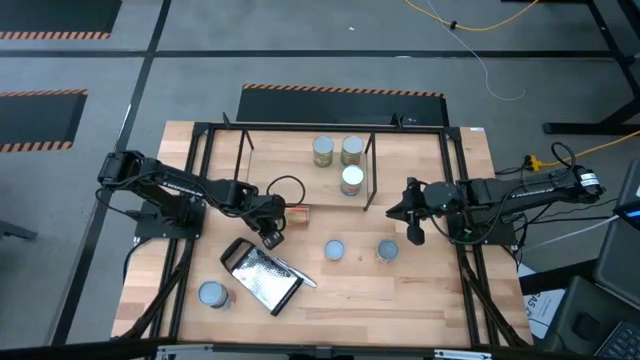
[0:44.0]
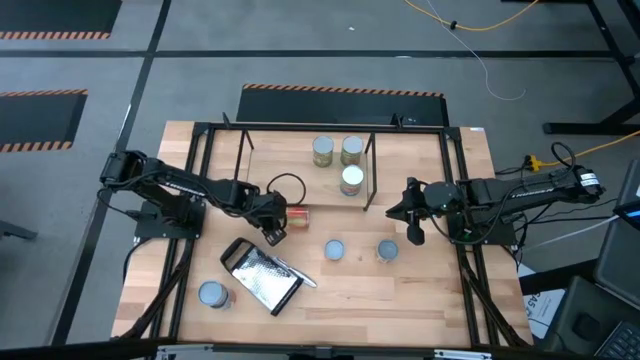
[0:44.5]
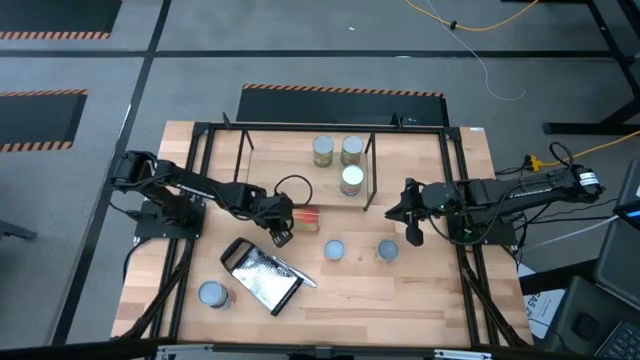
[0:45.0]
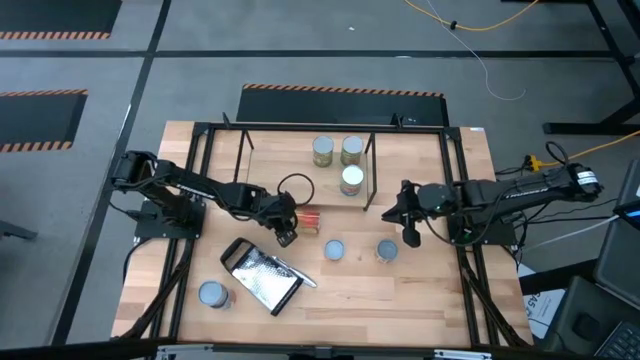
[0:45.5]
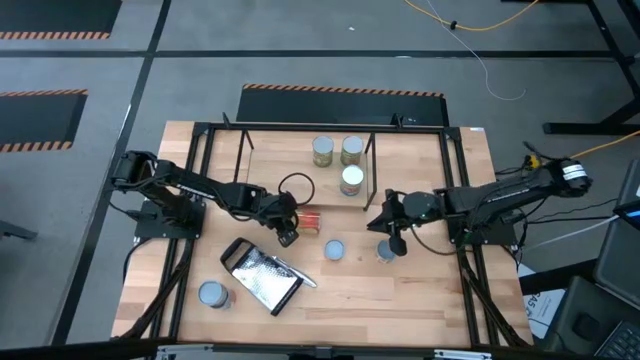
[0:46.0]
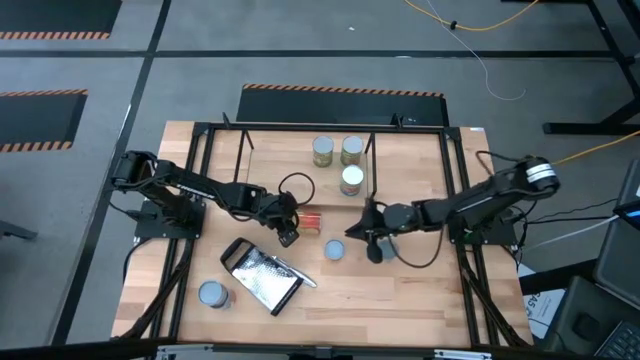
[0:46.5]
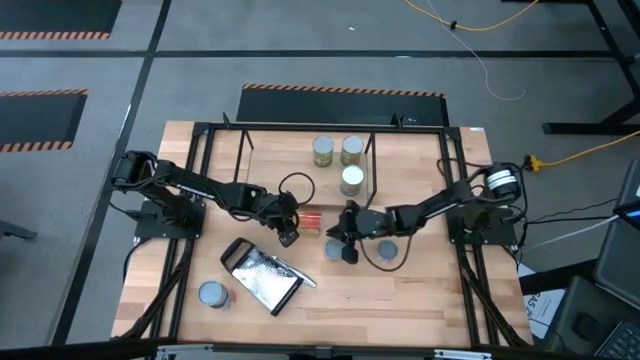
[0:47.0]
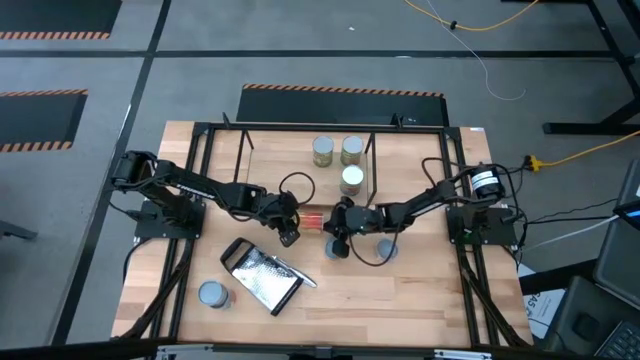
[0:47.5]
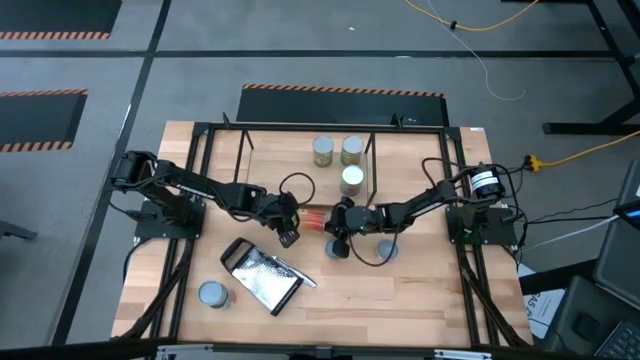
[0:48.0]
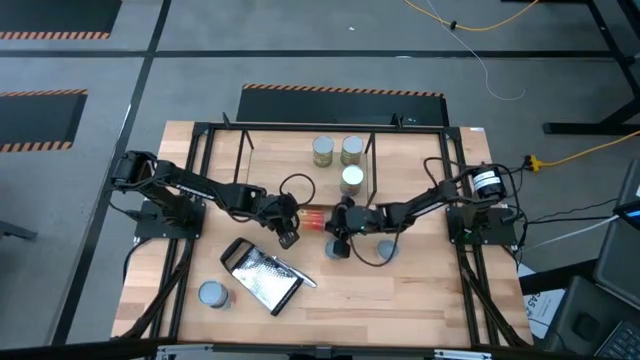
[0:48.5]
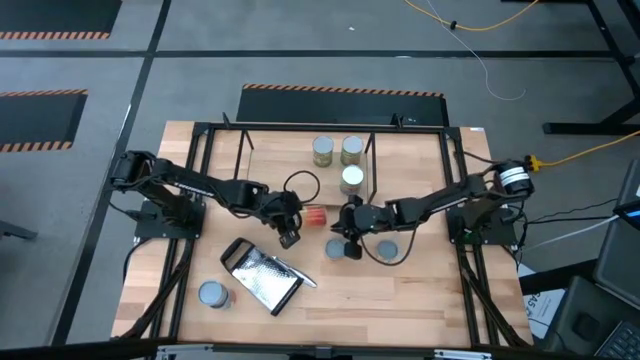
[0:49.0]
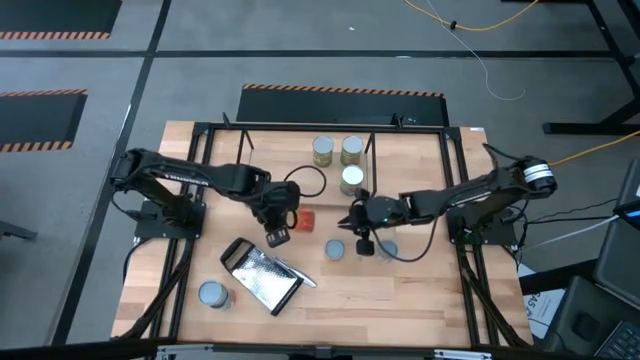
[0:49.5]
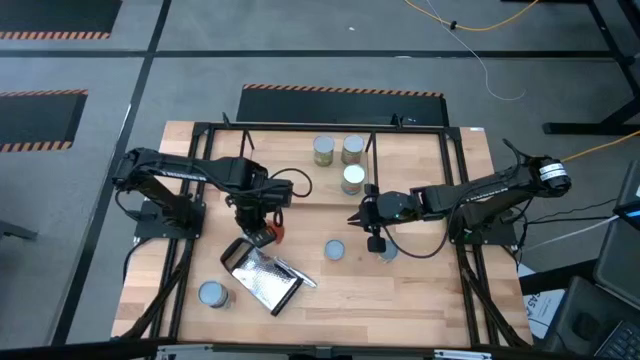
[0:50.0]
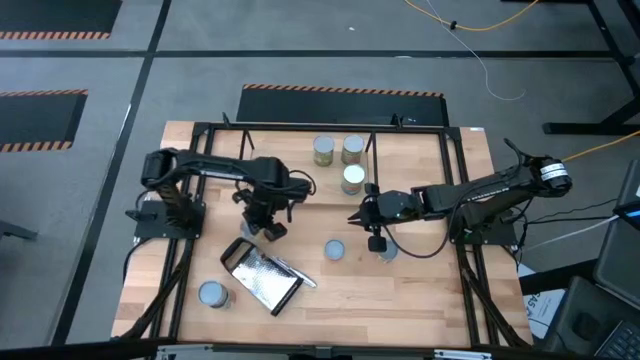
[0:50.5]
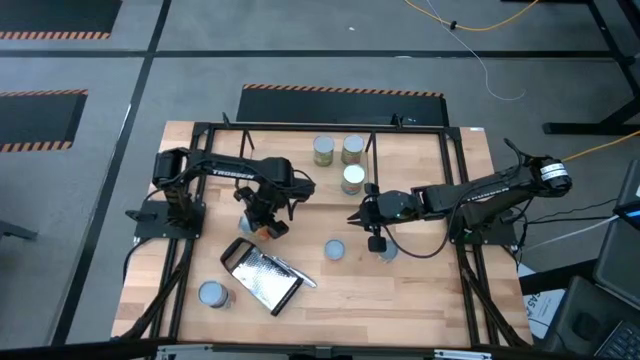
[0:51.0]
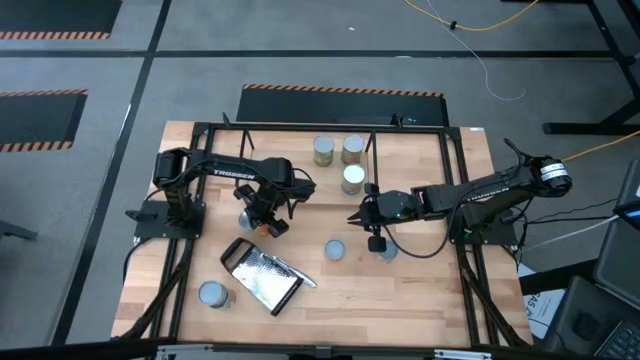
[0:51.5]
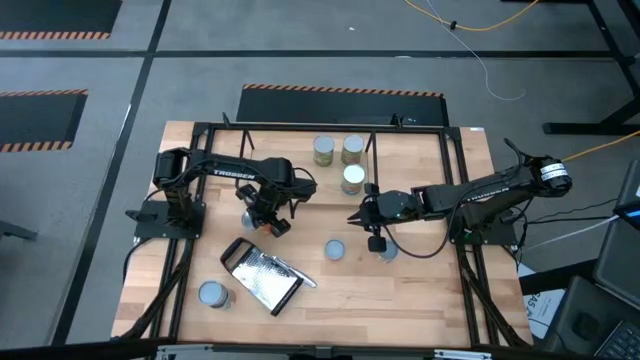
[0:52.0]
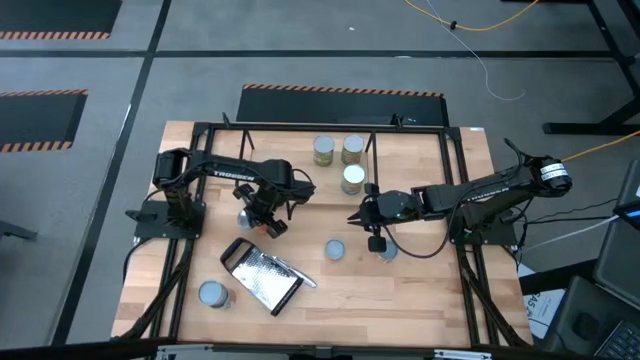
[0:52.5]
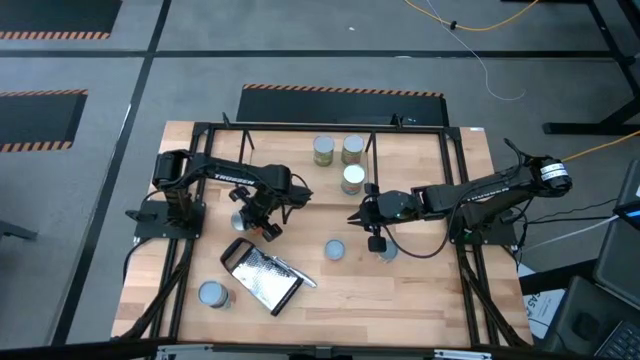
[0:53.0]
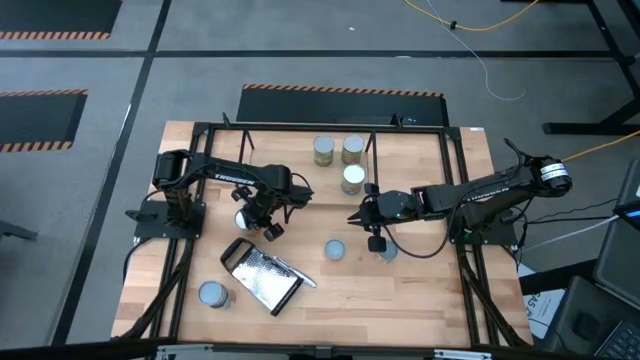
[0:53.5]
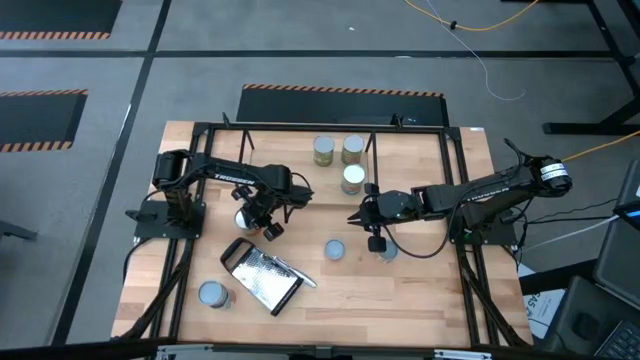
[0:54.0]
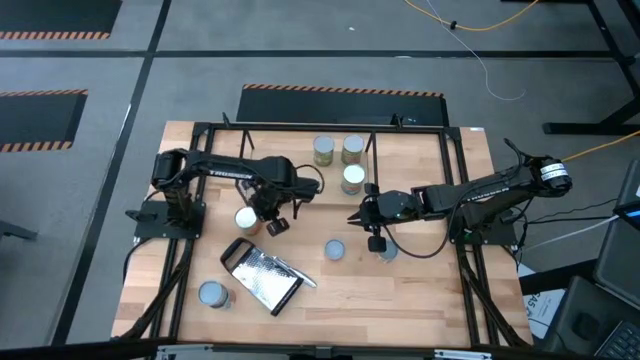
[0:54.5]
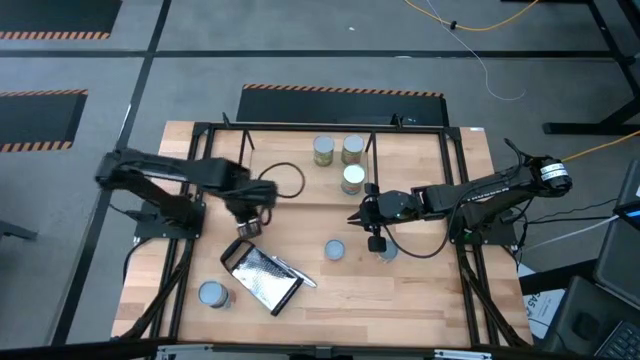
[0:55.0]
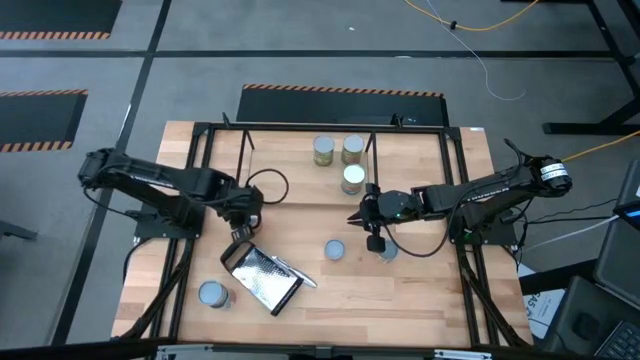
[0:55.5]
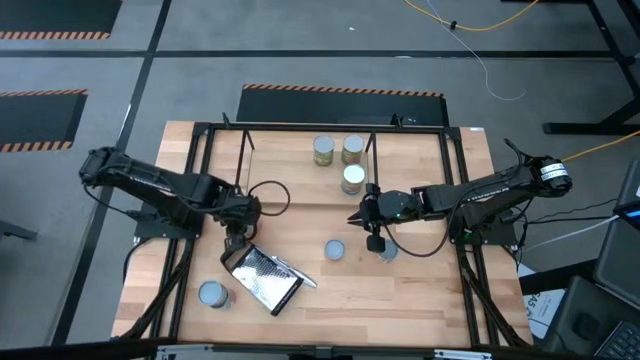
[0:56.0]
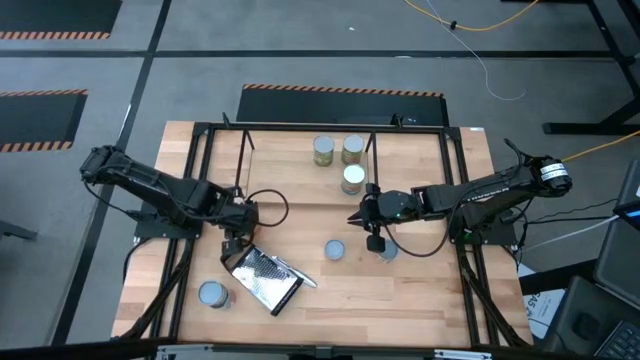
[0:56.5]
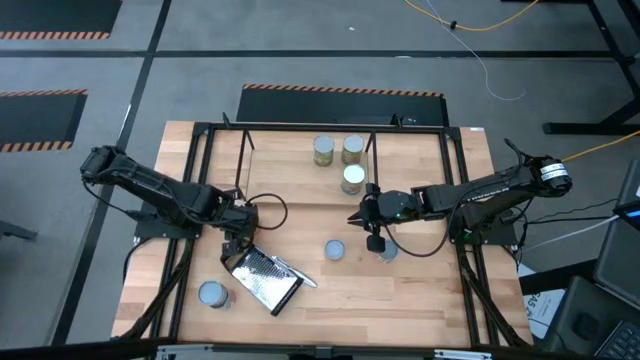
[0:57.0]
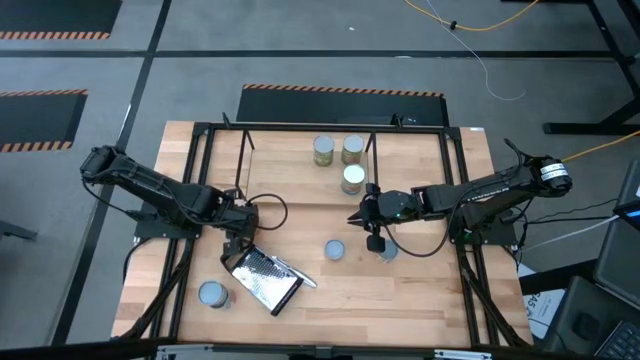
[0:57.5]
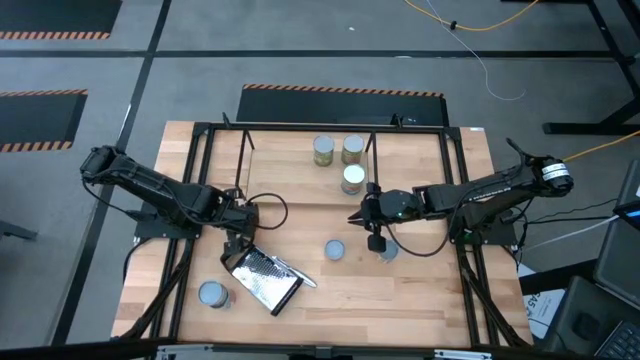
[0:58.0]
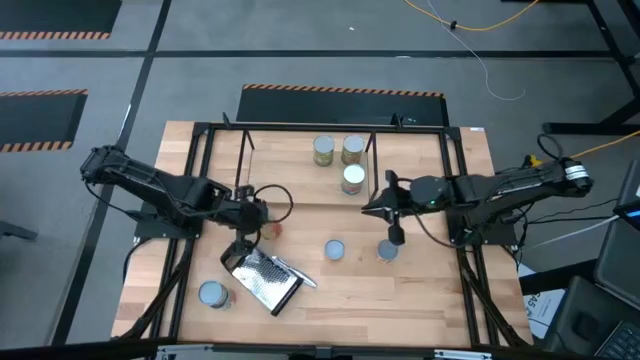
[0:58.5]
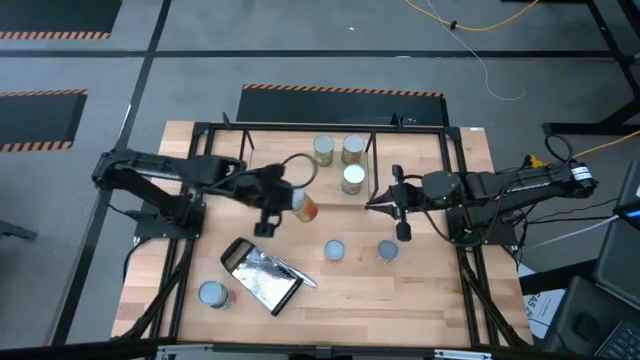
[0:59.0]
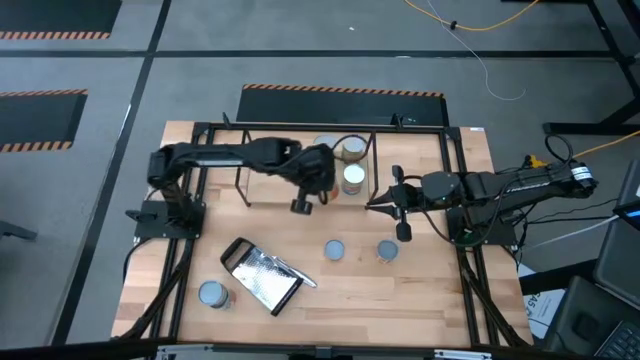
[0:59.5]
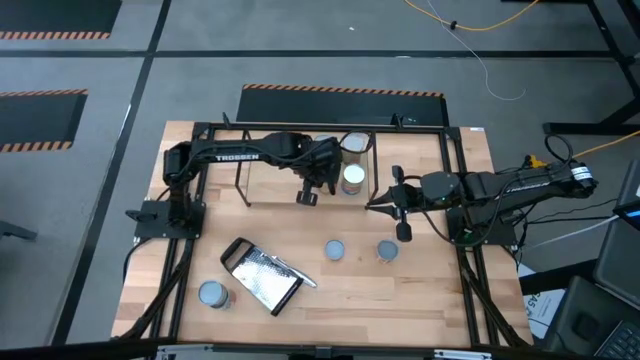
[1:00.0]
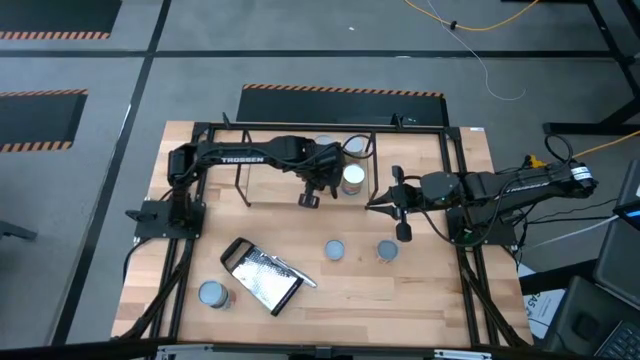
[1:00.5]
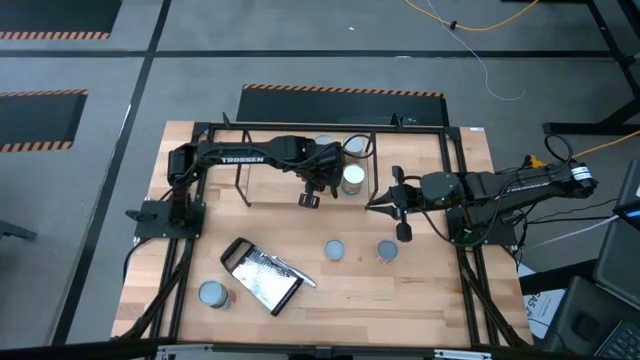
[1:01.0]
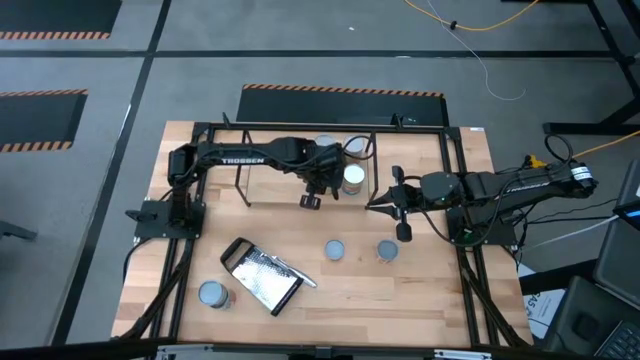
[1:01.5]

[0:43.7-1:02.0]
Task: Pick and place cans onto a shelf
Put the canned pineapple on the shelf

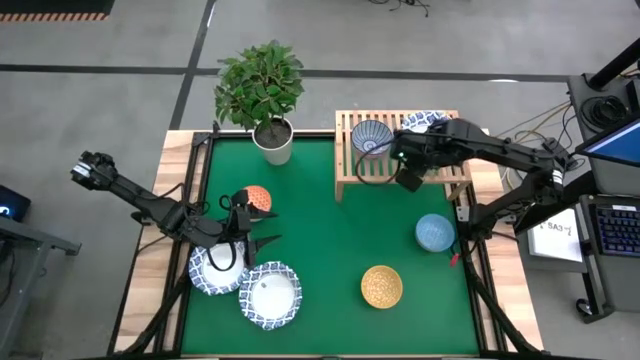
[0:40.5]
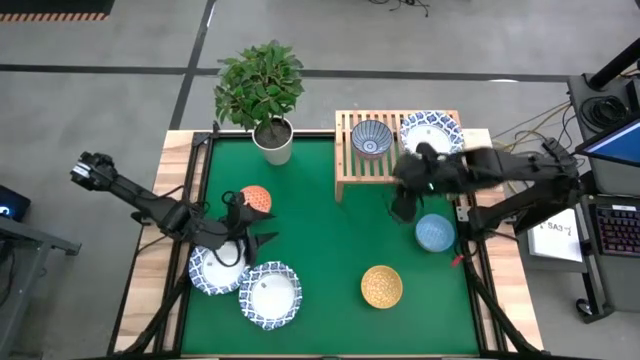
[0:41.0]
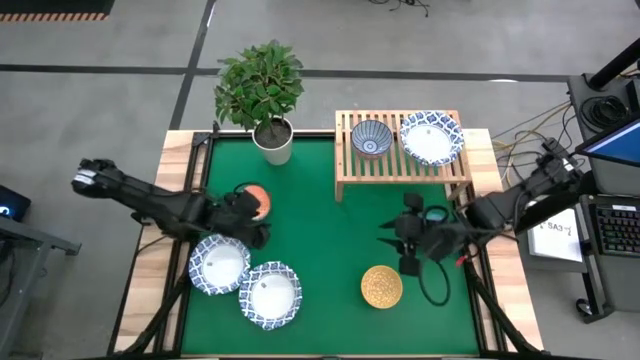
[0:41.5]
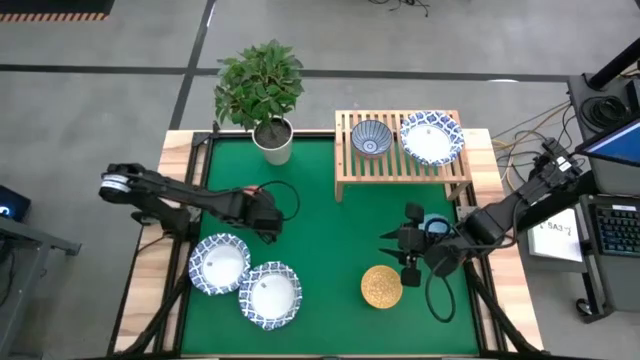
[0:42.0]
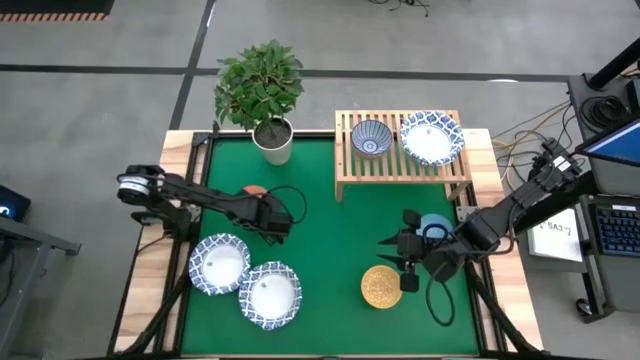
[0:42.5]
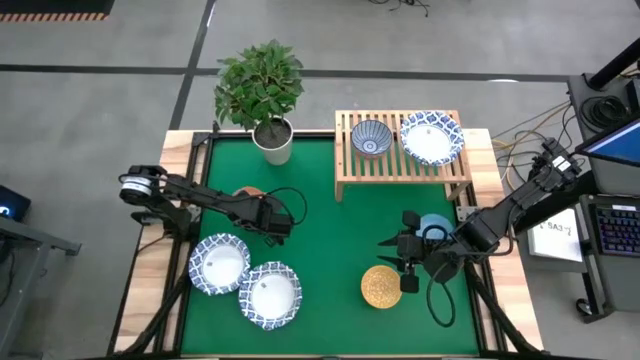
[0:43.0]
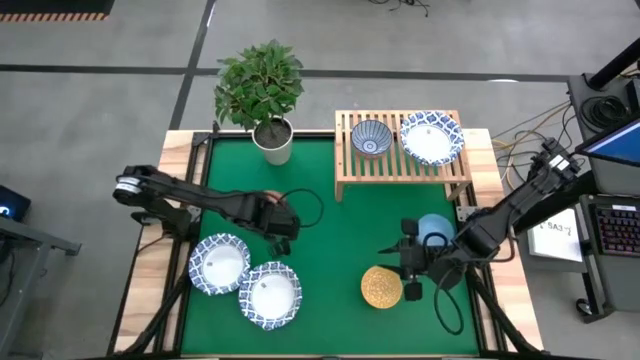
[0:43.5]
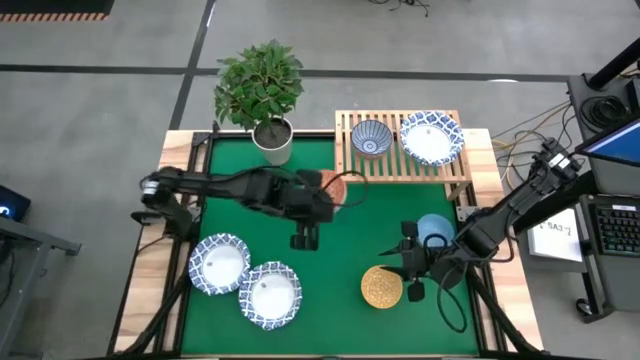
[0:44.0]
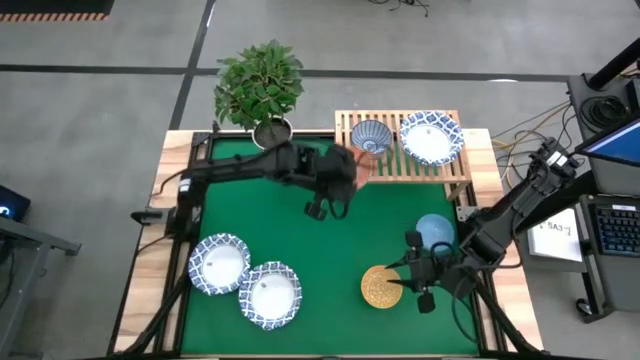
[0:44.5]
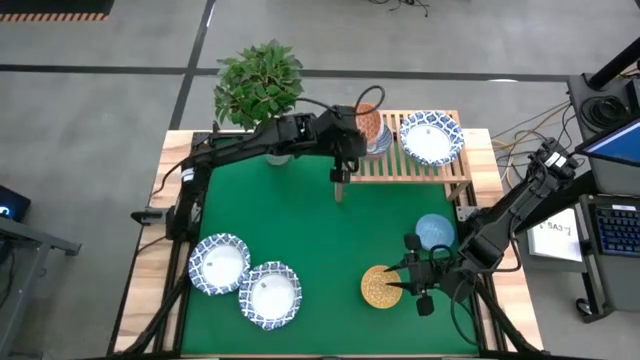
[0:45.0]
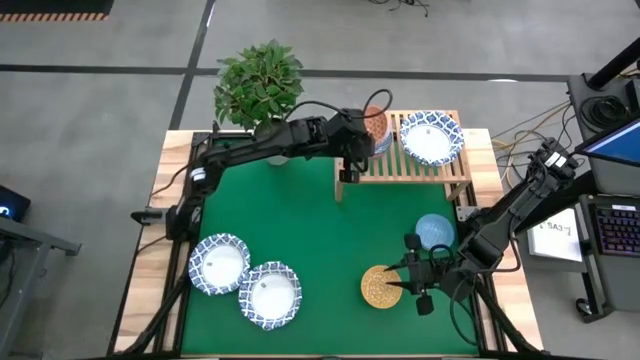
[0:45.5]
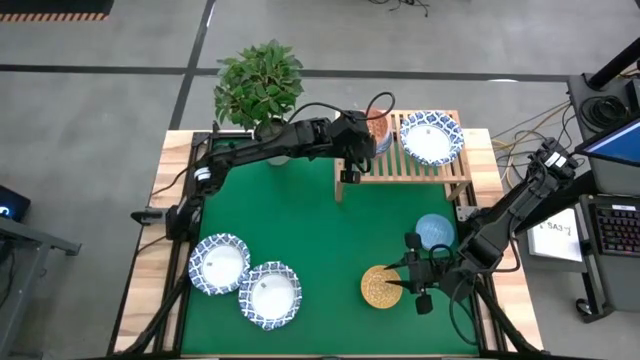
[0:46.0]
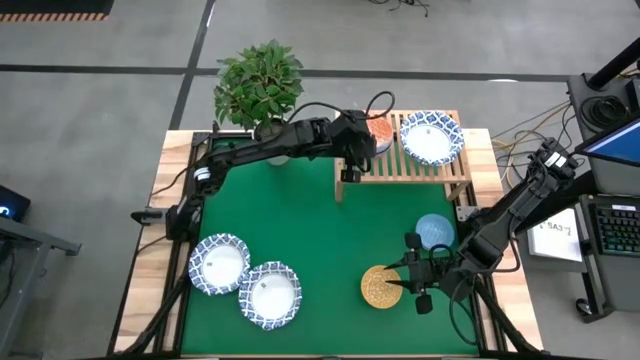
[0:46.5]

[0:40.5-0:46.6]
Task: Place and stack bowls onto a shelf
Stack the orange patterned bowl on top of the blue patterned bowl on the shelf
